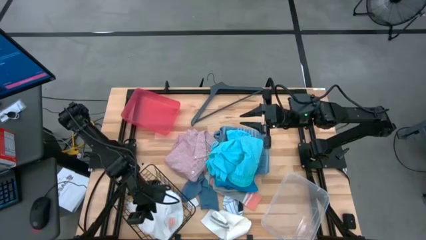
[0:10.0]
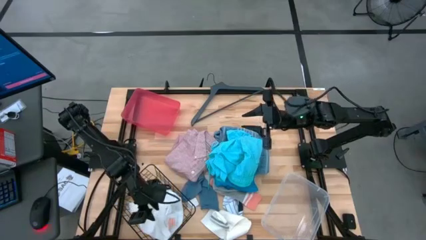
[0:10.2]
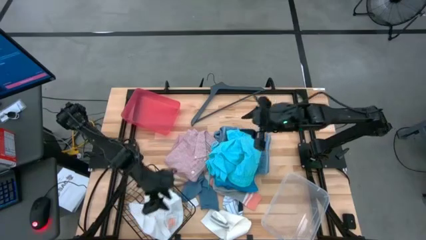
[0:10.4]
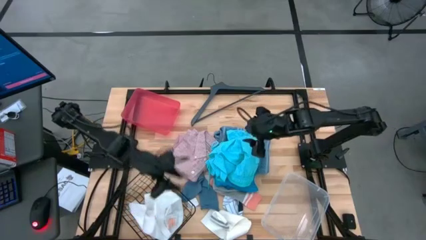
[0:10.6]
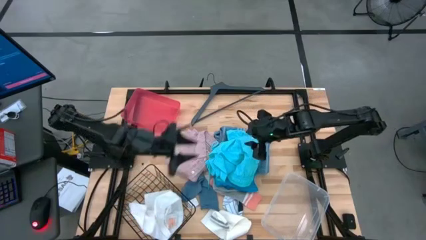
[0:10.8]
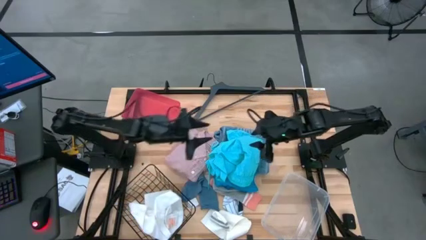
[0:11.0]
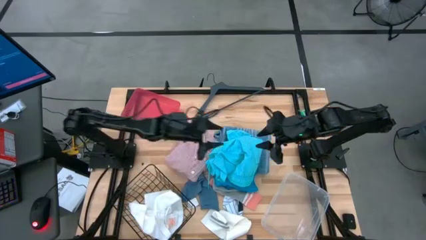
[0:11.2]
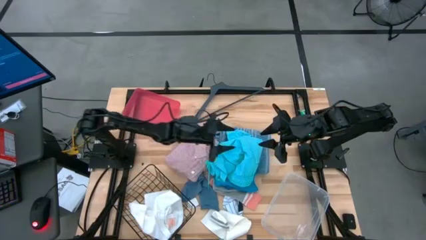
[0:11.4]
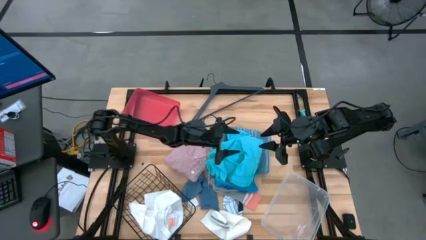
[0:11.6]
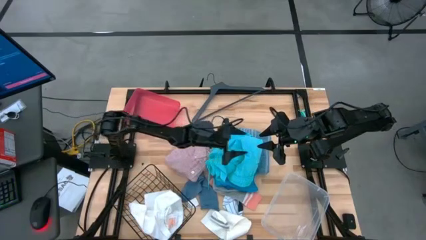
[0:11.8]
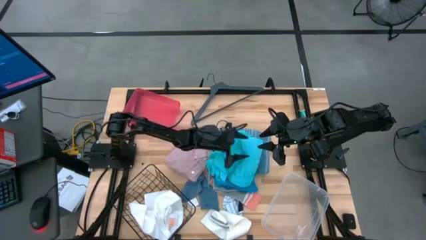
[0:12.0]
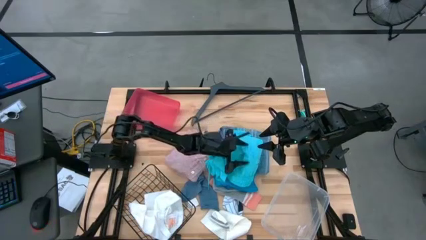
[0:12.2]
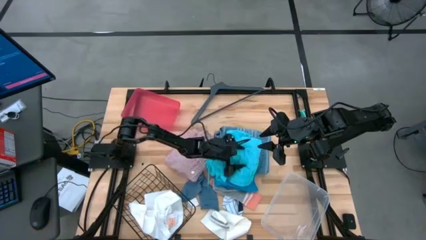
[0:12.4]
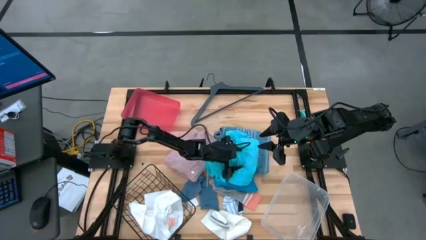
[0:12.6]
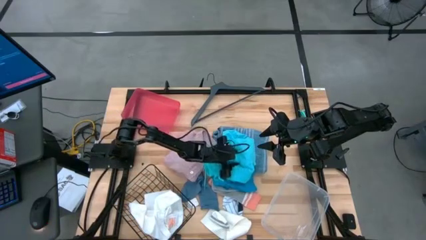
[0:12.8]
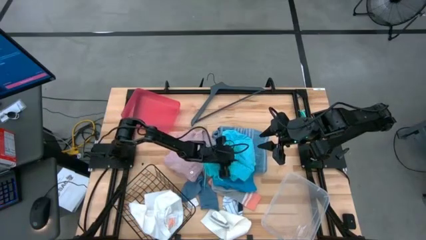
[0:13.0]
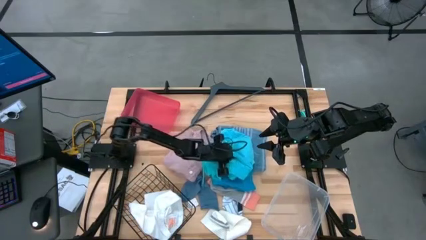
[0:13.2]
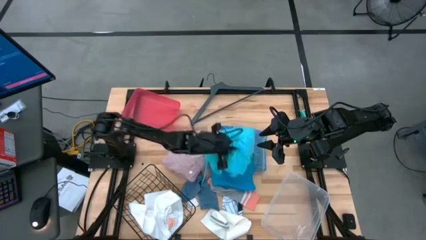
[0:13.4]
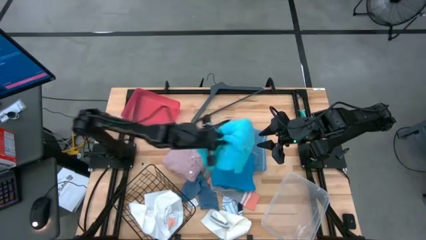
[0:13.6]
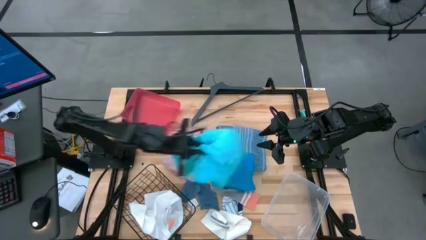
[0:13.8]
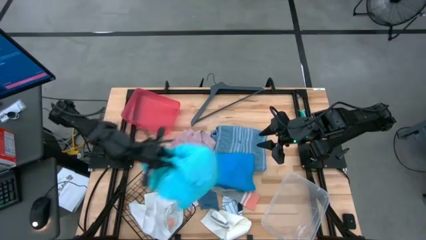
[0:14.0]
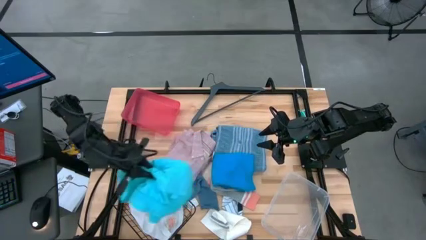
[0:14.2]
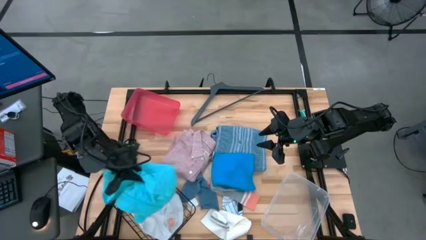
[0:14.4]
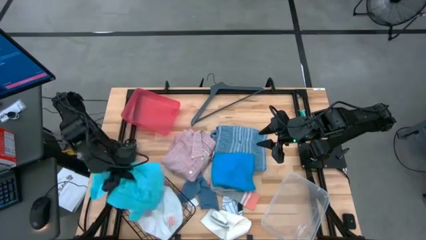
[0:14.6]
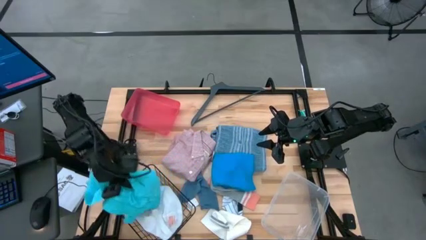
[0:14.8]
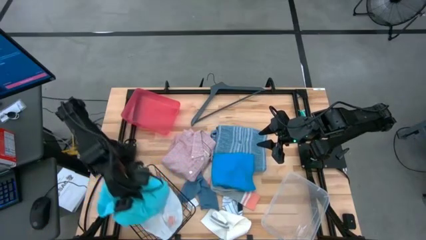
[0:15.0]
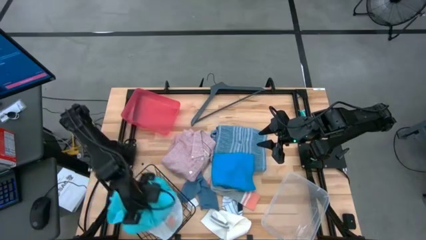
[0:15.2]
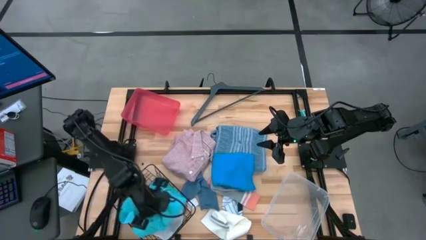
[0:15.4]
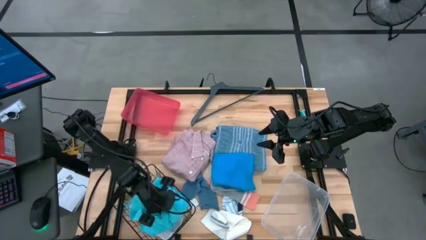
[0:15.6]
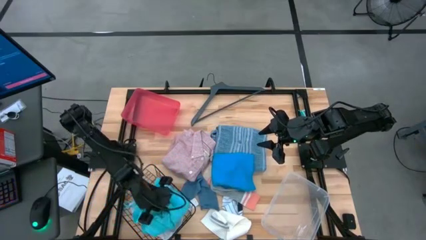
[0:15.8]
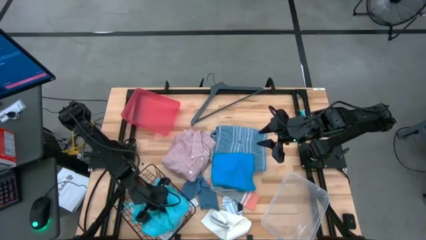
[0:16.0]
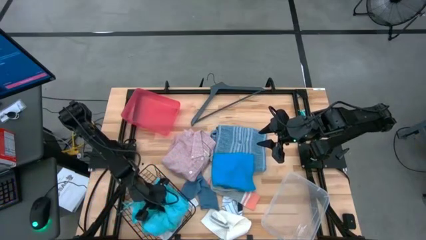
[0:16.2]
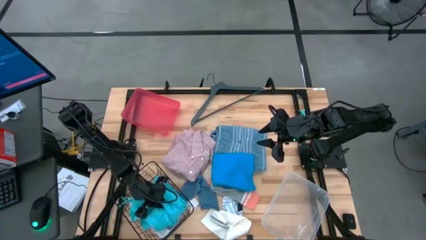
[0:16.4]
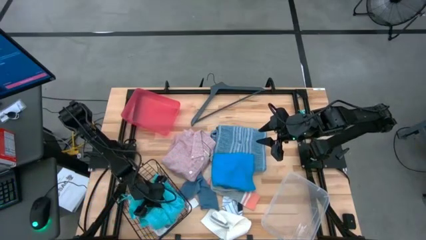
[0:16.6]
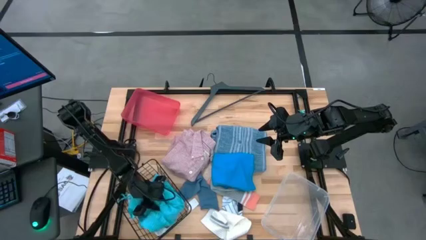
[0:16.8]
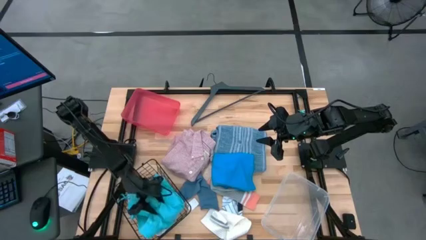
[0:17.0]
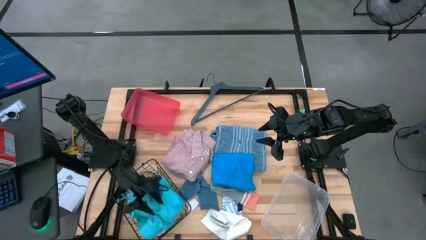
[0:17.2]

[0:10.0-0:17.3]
Task: Pick & Place Cloths
Put the light blue shorts into the black wire basket

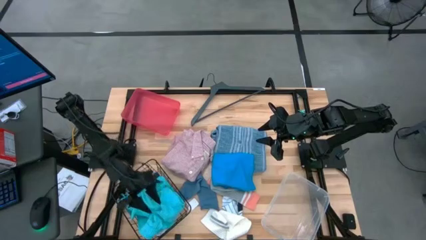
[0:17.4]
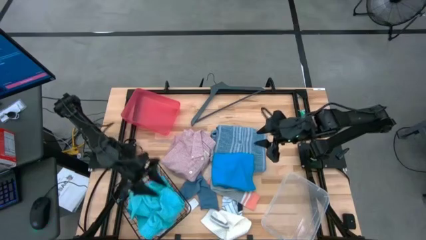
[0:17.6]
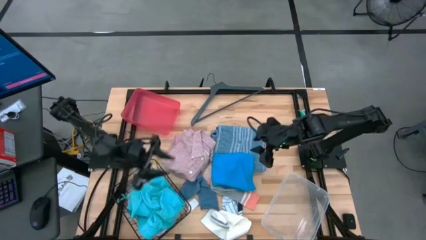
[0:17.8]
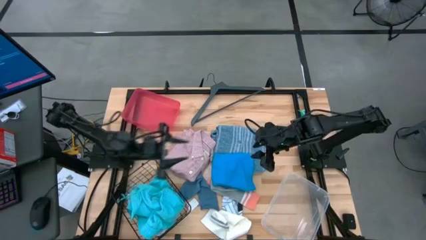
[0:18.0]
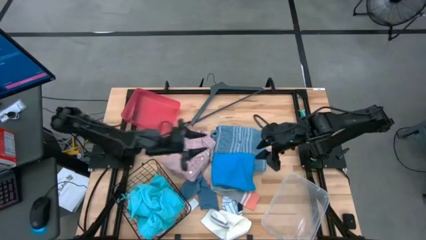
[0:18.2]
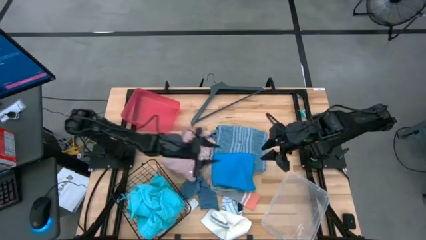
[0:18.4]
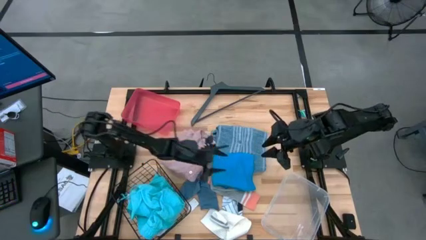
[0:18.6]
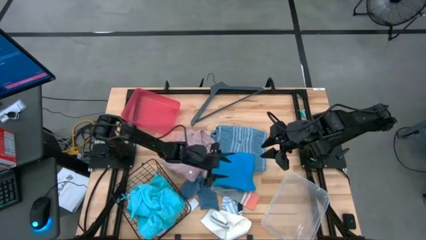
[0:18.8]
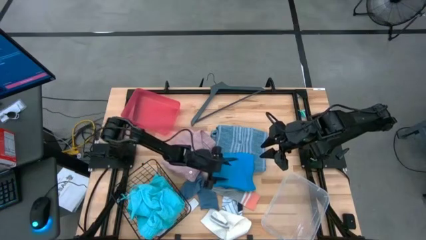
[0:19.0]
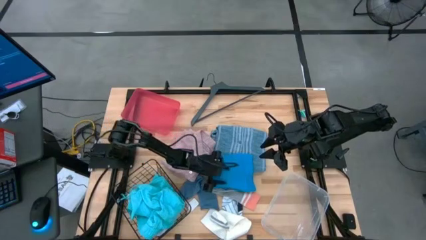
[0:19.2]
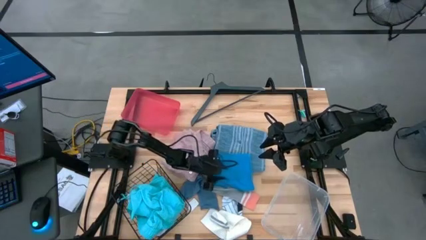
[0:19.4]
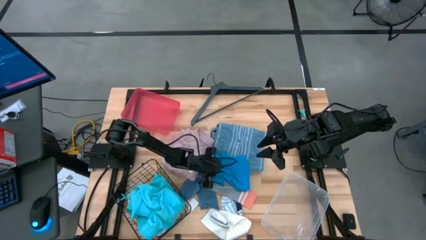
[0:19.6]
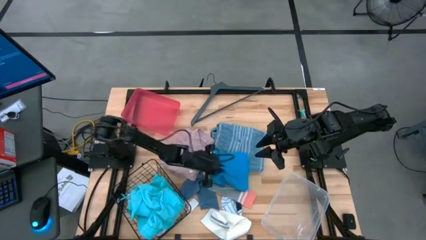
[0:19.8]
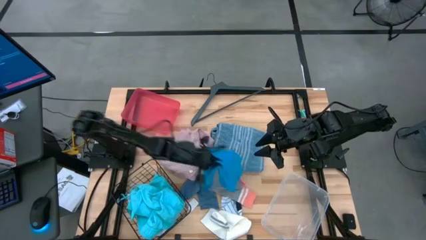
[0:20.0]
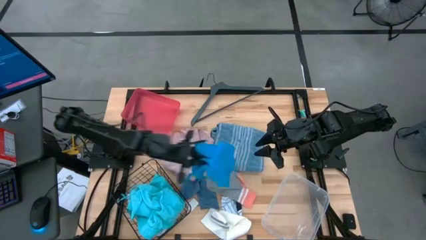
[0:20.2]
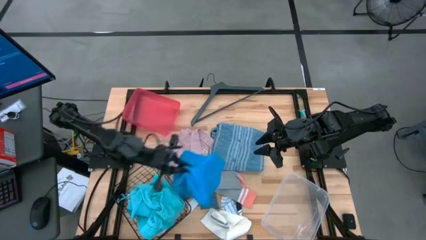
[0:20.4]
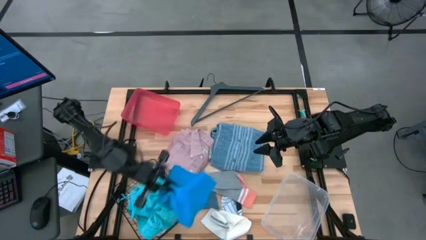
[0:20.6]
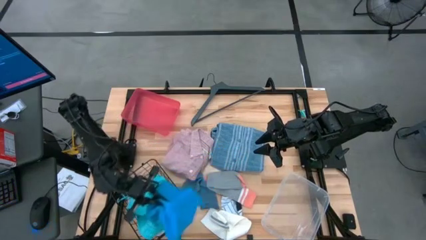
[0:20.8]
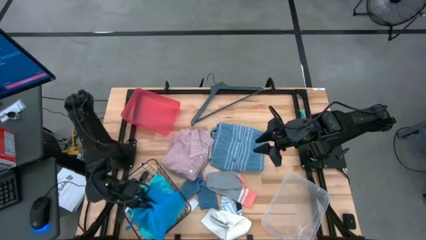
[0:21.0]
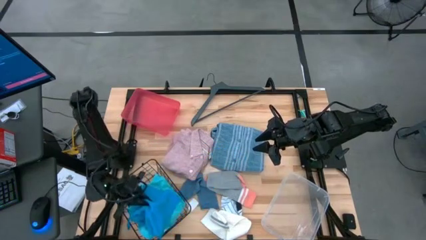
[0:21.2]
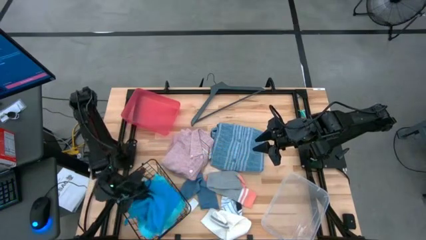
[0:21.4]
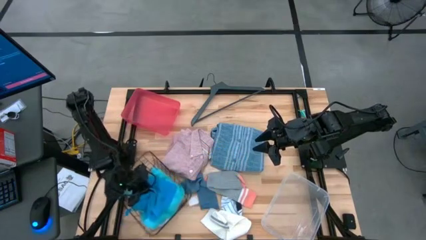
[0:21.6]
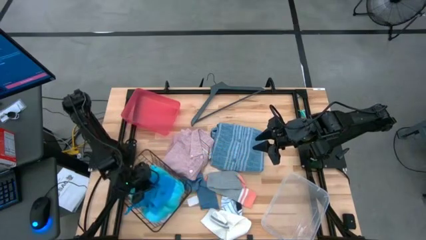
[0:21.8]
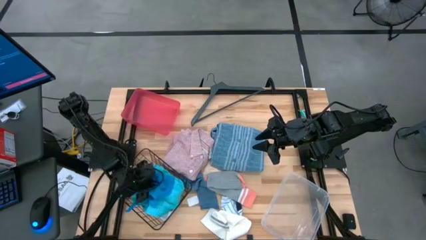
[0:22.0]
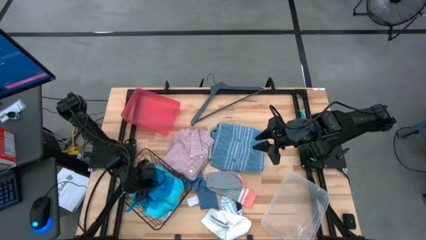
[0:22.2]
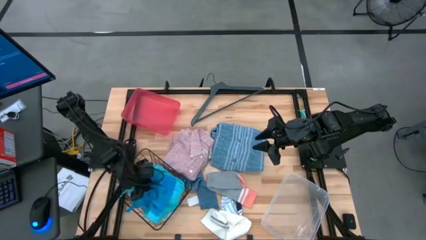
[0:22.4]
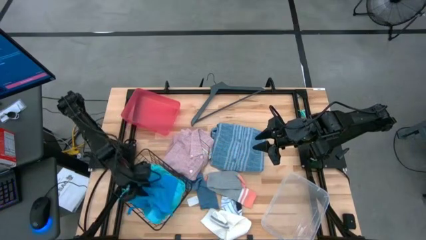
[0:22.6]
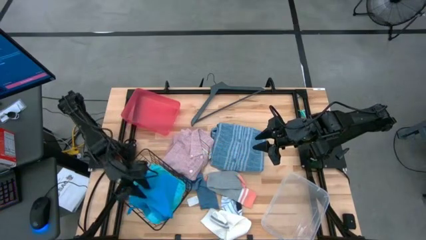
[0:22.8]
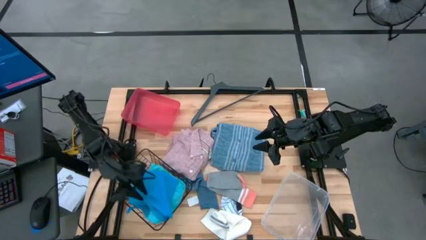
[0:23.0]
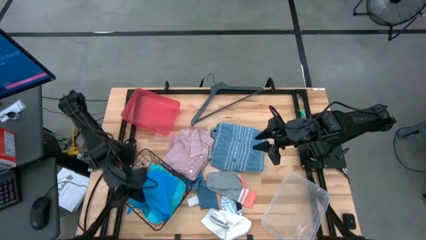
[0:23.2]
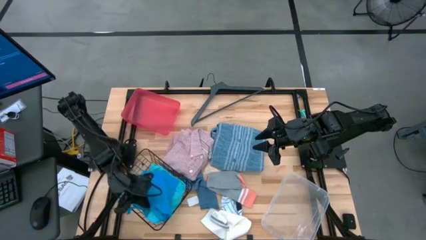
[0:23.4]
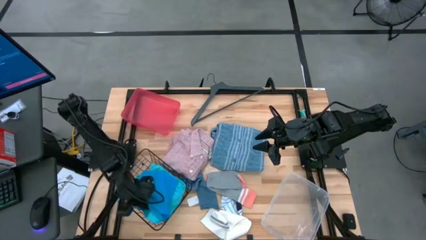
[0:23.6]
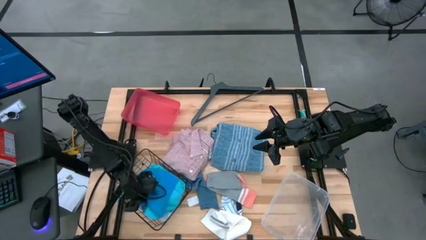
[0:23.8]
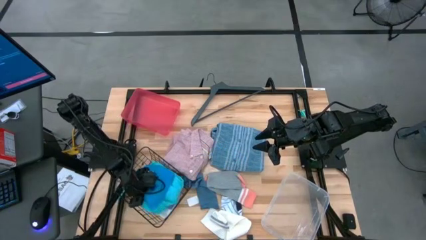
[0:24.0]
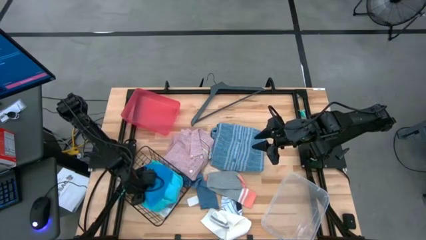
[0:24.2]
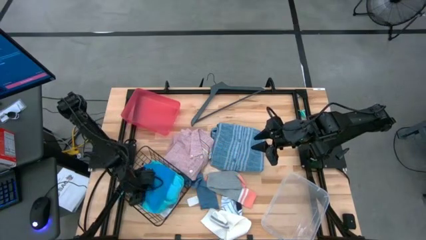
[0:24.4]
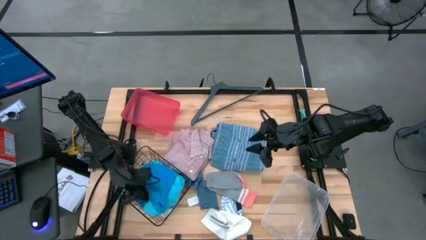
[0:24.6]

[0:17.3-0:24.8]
Put the blue shorts into the black wire basket
